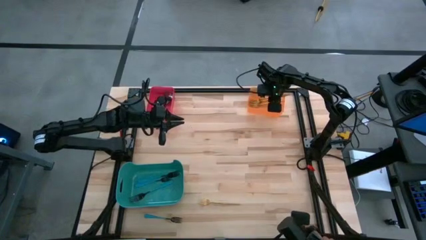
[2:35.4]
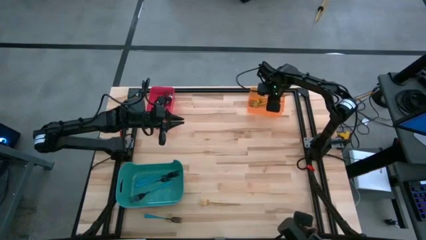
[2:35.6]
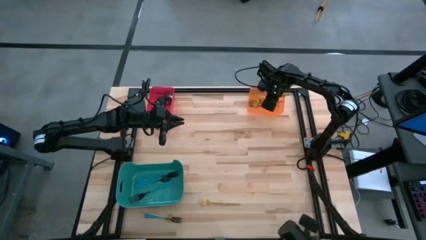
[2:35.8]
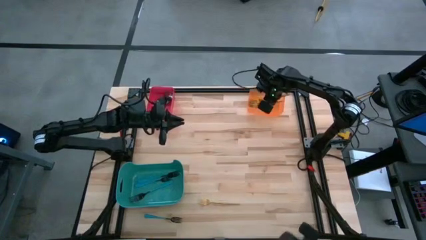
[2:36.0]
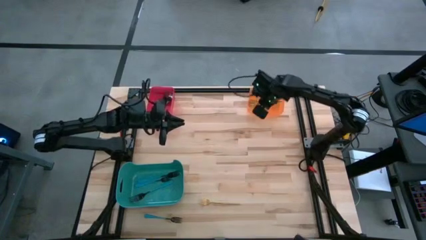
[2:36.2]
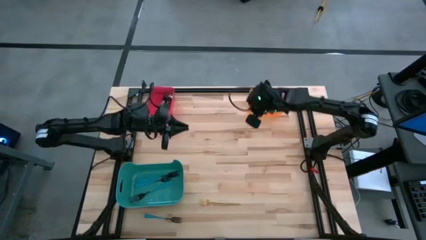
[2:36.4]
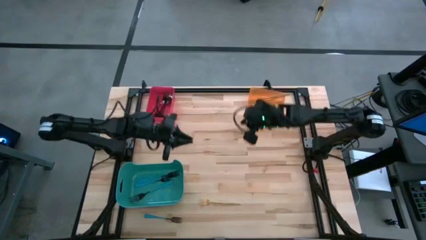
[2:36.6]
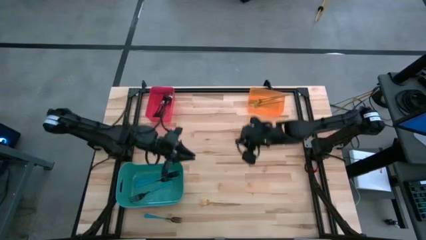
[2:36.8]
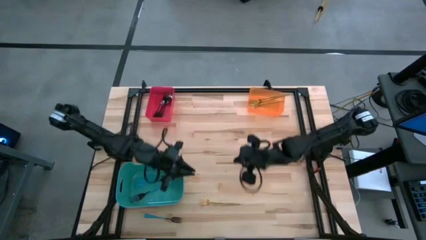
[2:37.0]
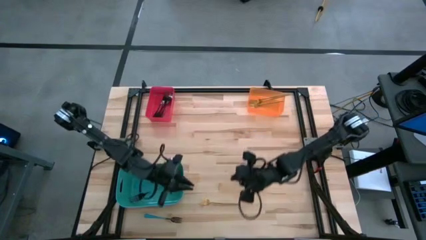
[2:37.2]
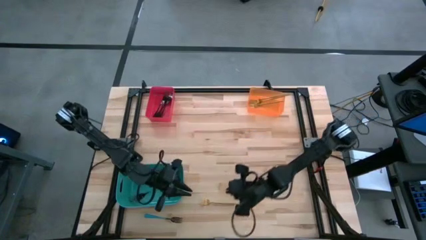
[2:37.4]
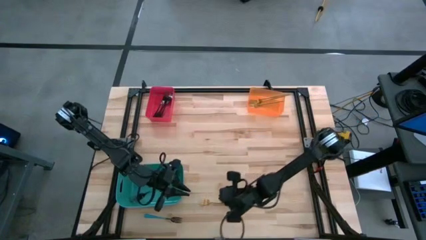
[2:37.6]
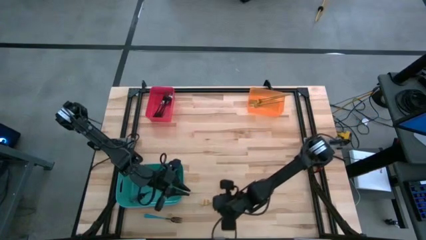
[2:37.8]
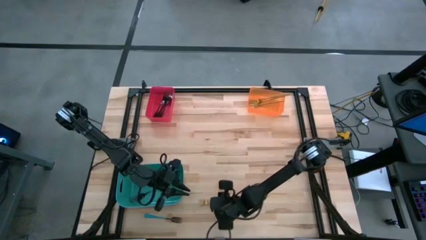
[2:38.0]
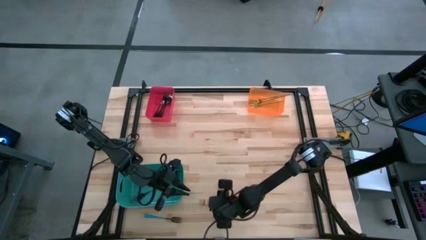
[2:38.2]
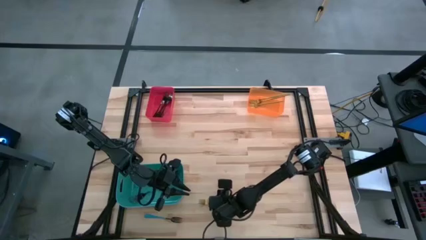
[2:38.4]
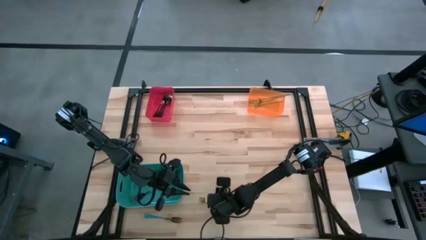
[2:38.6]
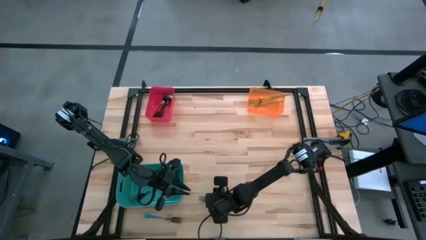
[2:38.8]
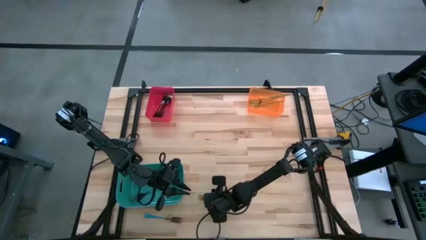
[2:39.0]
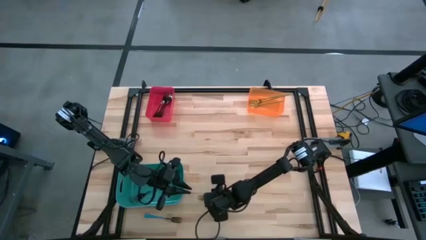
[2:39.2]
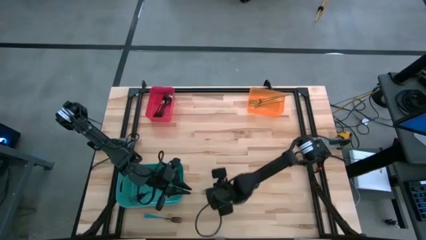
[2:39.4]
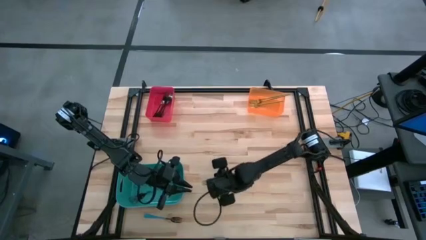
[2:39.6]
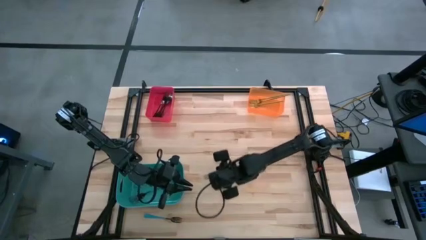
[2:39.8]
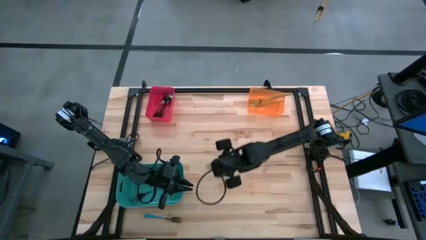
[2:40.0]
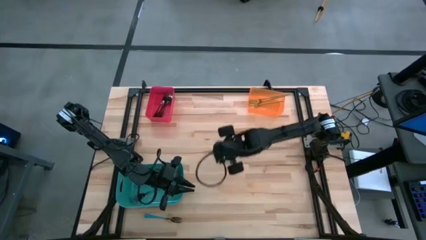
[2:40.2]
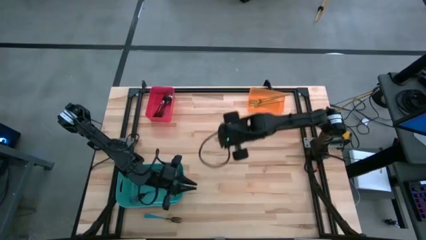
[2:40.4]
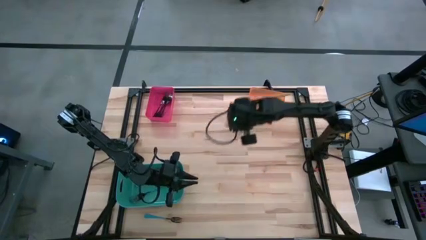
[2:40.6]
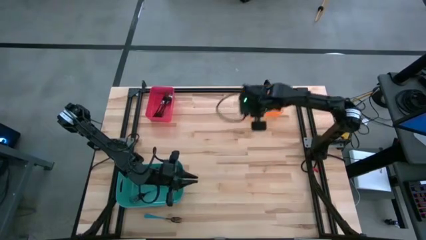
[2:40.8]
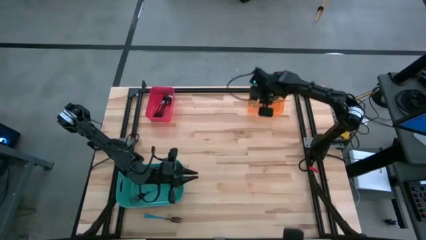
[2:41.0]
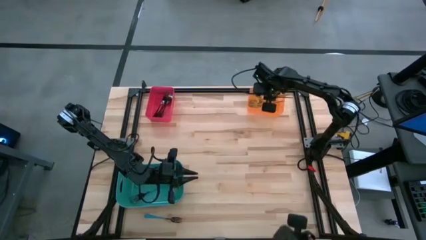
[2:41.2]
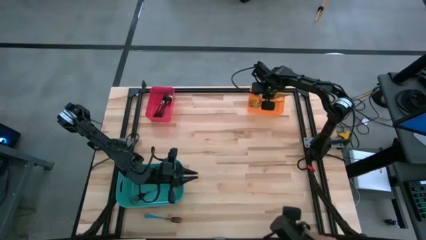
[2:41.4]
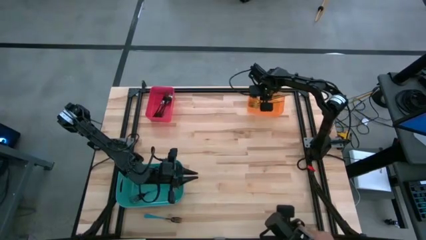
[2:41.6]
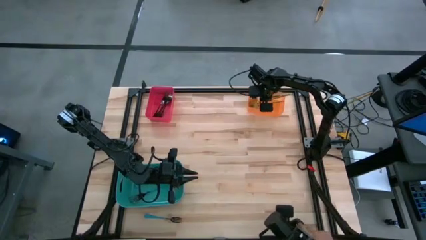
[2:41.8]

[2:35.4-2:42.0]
Task: Sort silverware by color (type)
Put the gold fork into the orange bin

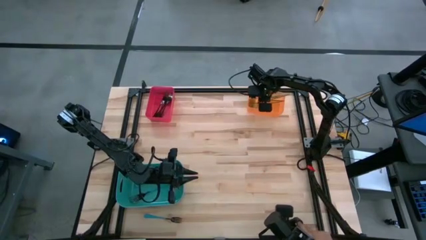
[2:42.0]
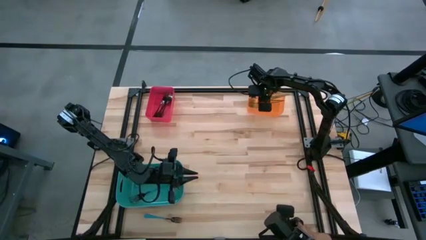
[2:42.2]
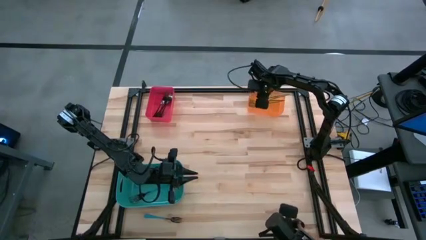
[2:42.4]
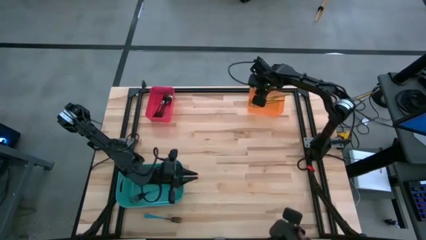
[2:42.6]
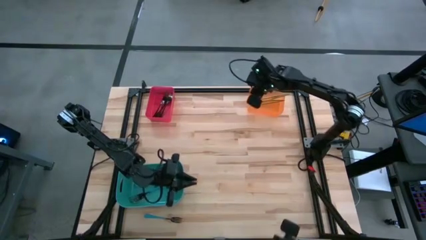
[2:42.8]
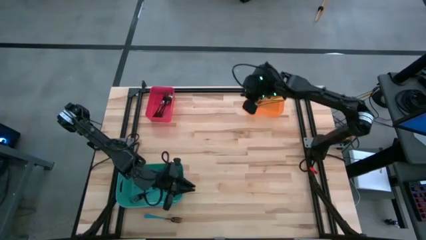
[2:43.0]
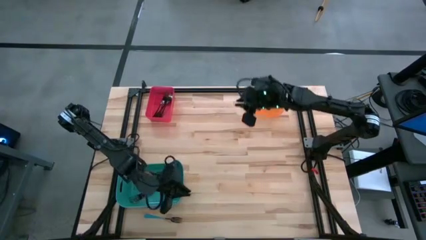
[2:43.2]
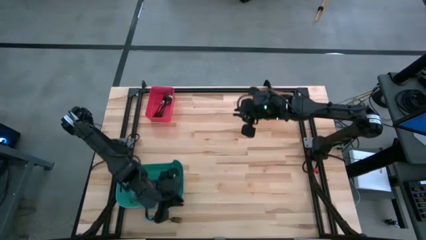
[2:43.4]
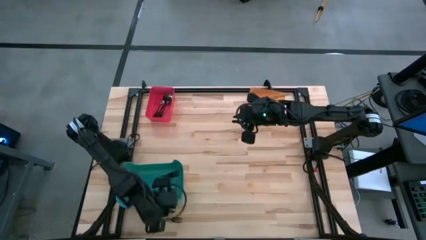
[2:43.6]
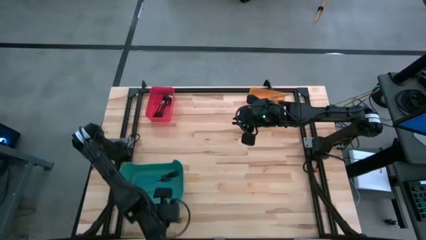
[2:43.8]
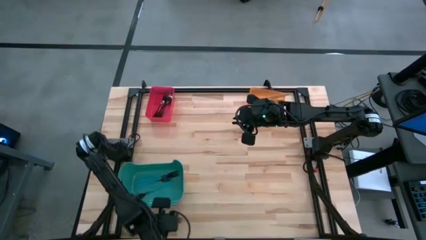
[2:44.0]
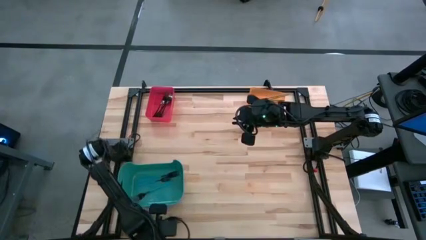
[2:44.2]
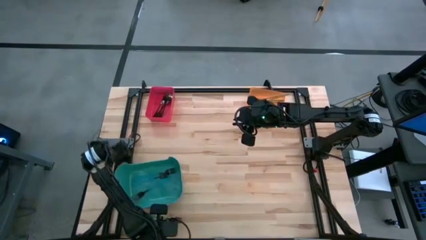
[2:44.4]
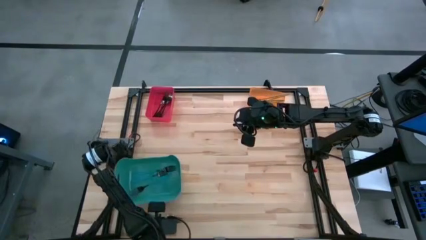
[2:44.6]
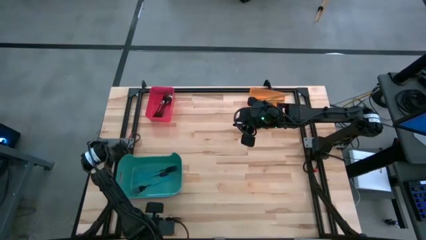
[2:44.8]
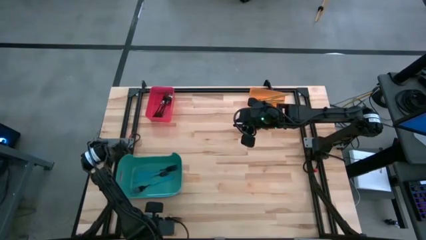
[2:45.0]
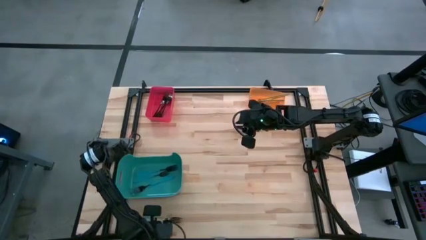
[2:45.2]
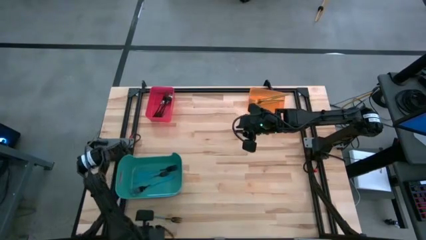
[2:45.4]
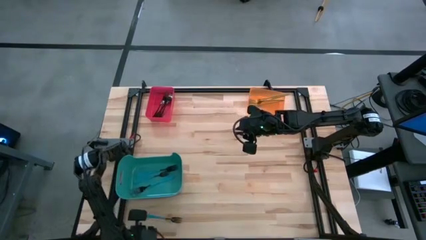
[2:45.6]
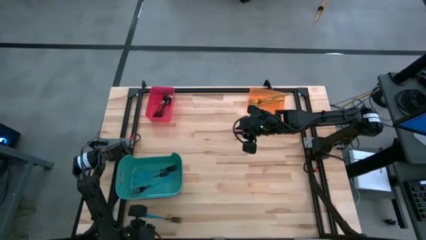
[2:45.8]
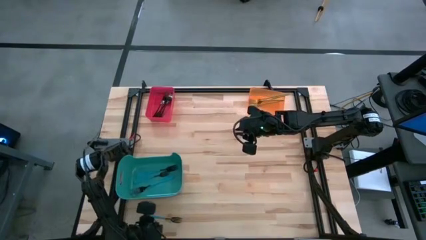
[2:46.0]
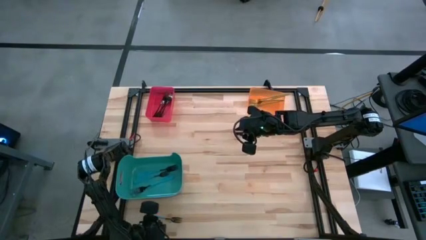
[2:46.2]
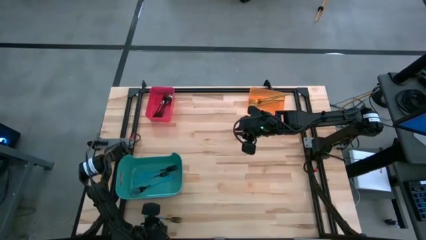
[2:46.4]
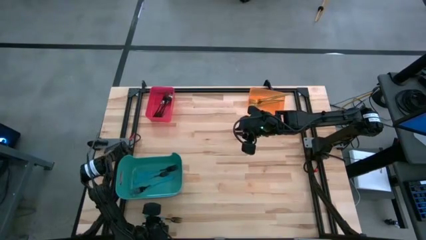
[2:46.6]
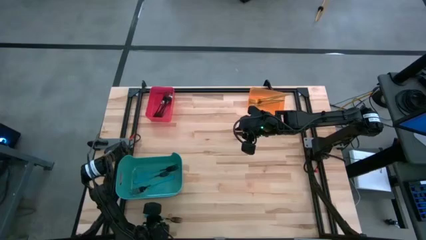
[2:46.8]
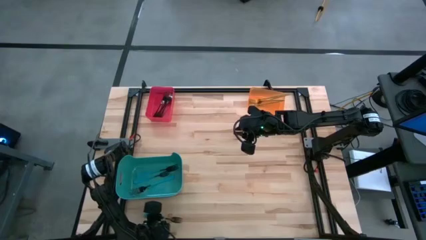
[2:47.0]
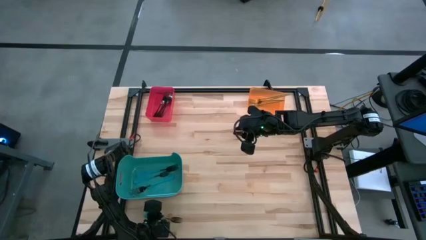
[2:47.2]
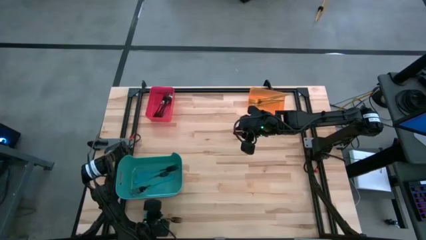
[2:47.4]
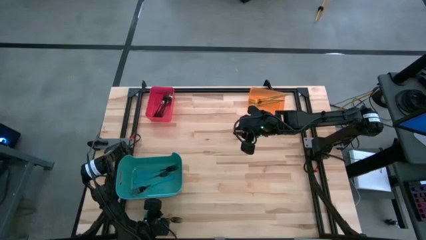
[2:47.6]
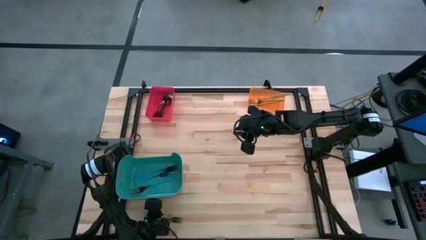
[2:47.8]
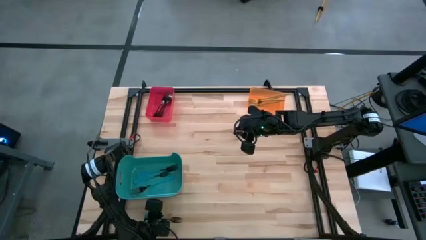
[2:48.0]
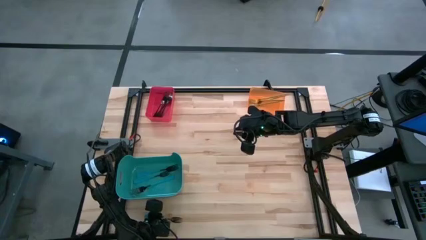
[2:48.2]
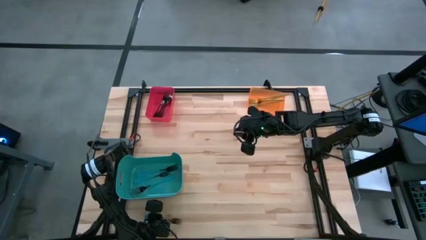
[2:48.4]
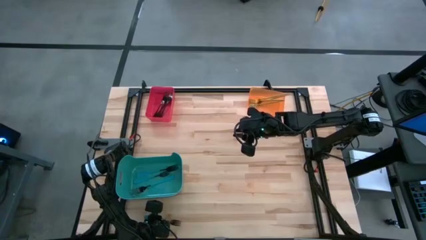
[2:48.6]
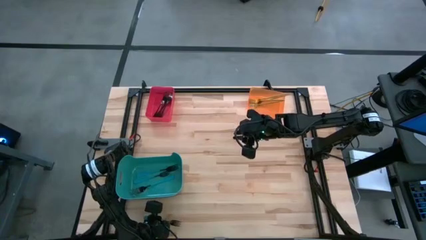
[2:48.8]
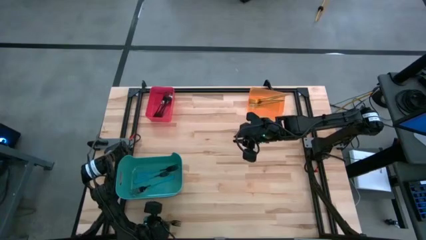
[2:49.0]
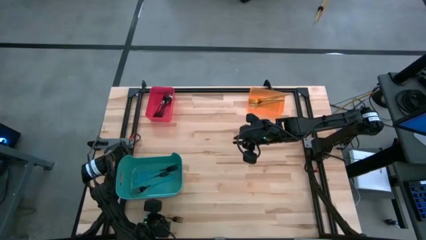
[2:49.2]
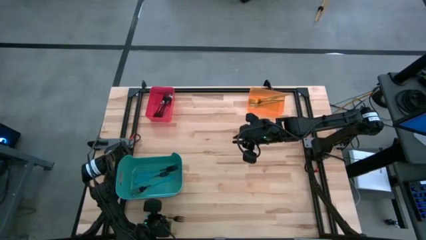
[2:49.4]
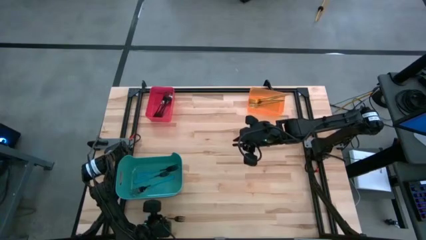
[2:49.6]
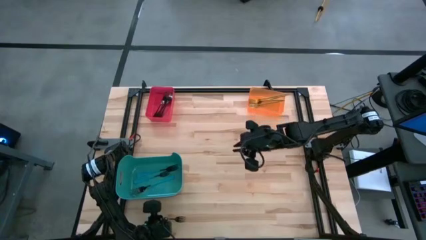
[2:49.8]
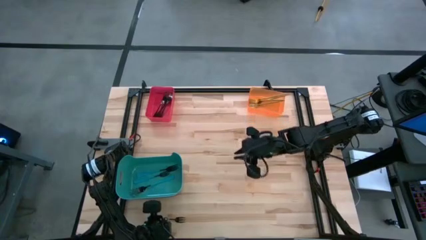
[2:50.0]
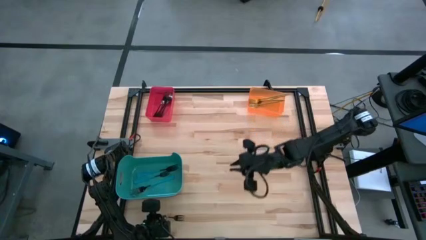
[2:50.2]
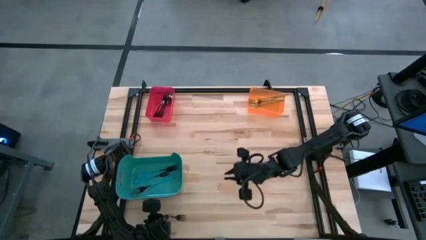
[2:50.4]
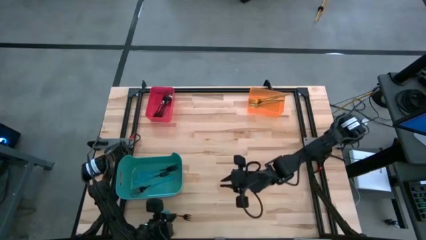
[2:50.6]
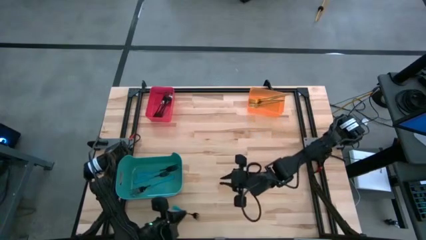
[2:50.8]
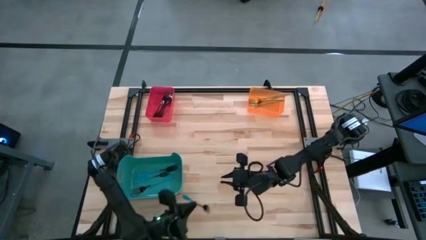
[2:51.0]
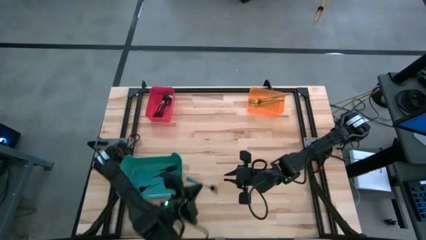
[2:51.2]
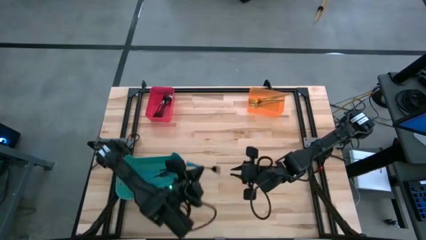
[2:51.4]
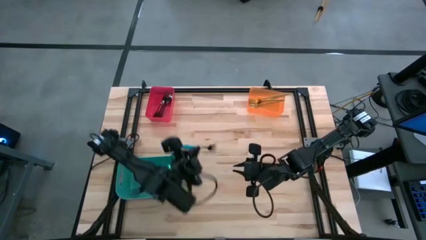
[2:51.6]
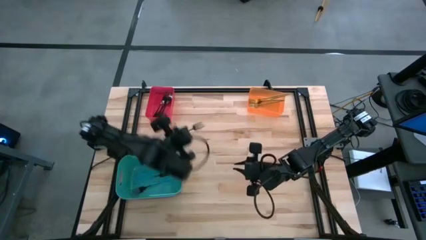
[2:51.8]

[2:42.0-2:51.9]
Put the blue fork into the green bin
